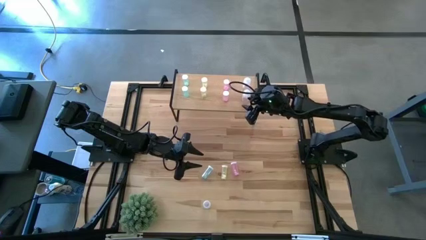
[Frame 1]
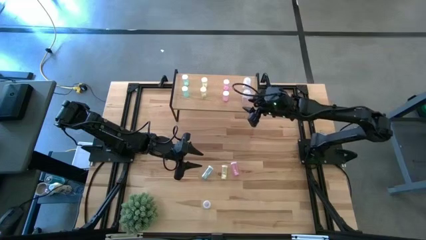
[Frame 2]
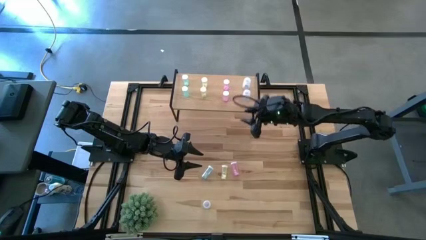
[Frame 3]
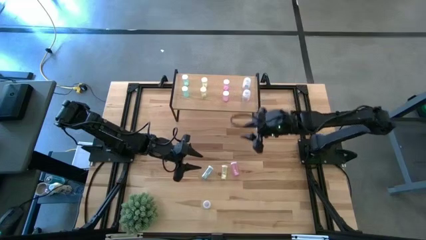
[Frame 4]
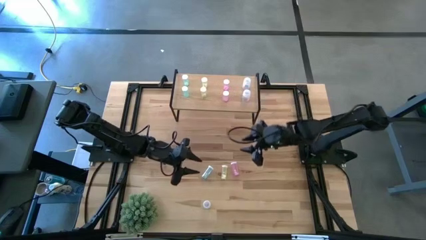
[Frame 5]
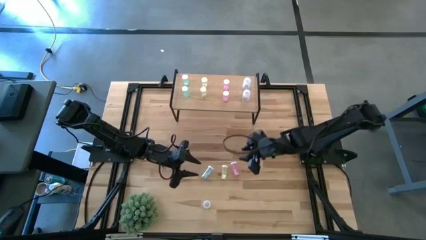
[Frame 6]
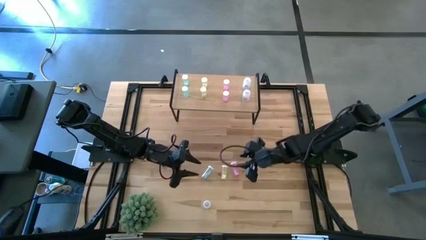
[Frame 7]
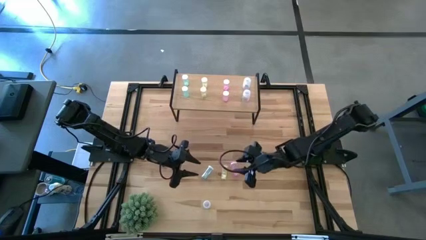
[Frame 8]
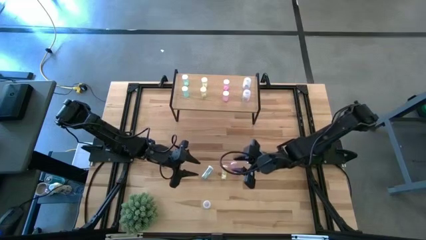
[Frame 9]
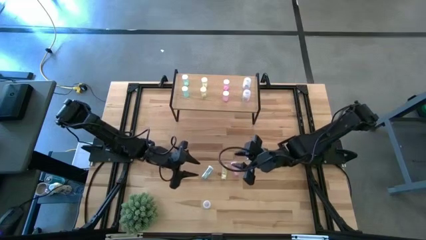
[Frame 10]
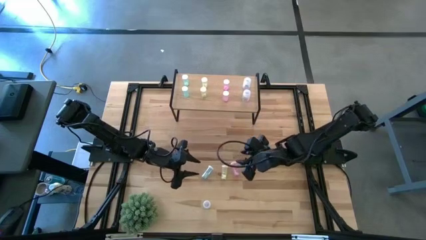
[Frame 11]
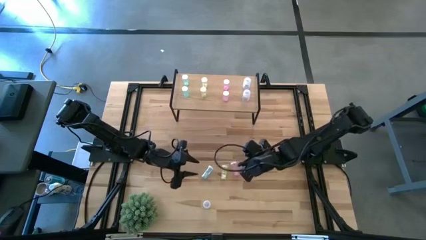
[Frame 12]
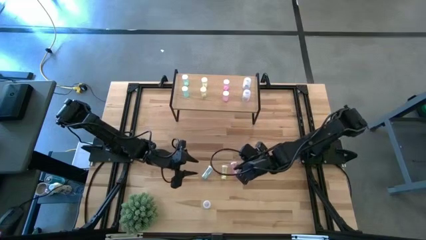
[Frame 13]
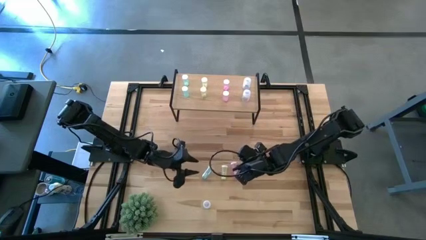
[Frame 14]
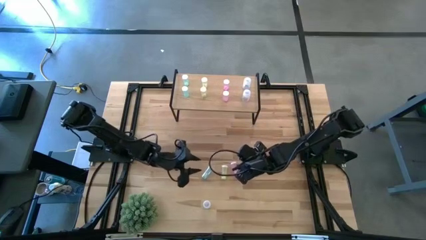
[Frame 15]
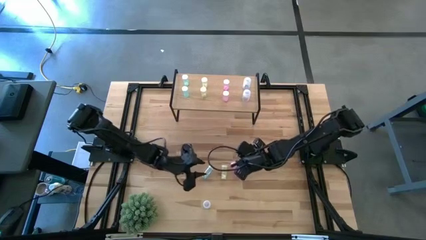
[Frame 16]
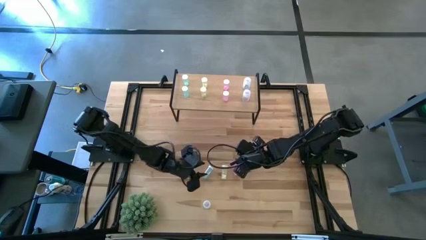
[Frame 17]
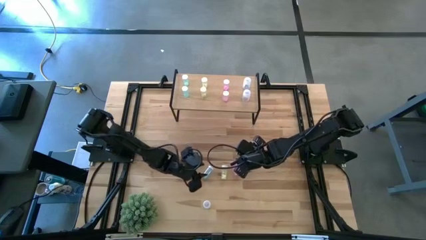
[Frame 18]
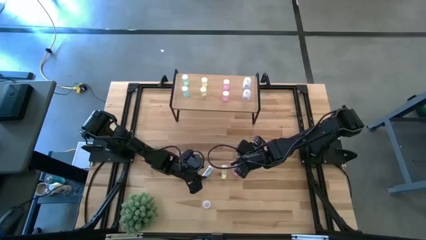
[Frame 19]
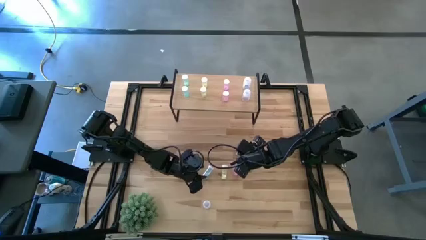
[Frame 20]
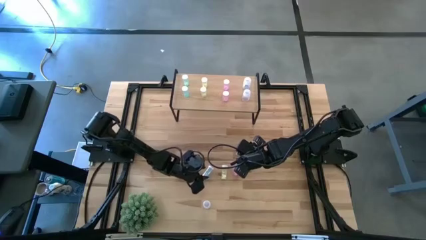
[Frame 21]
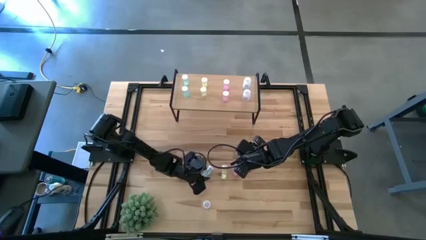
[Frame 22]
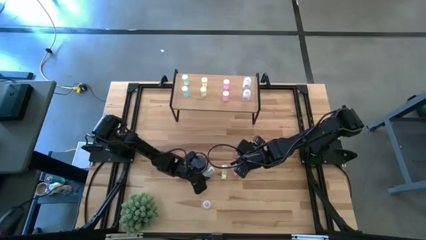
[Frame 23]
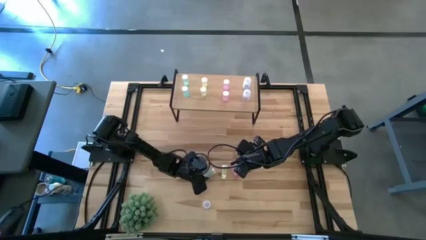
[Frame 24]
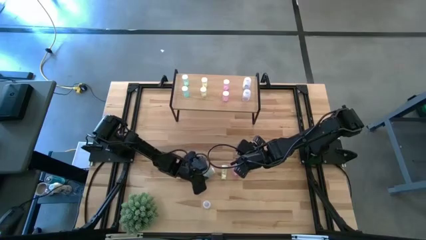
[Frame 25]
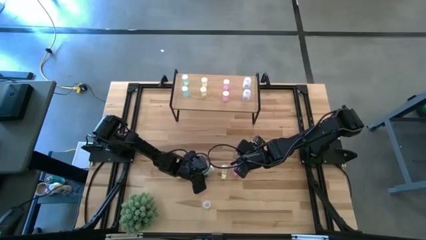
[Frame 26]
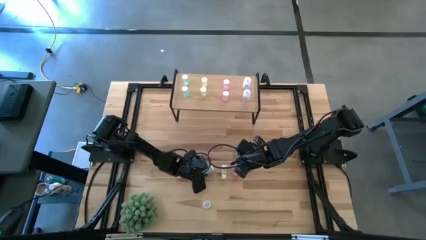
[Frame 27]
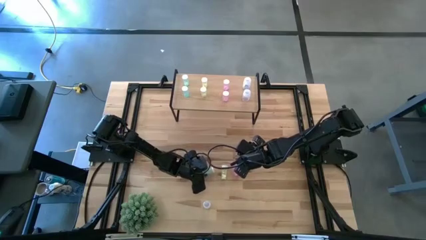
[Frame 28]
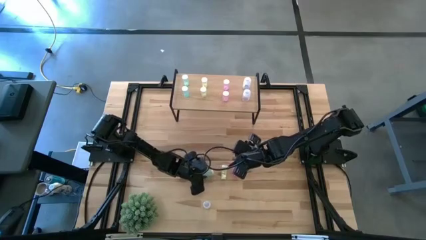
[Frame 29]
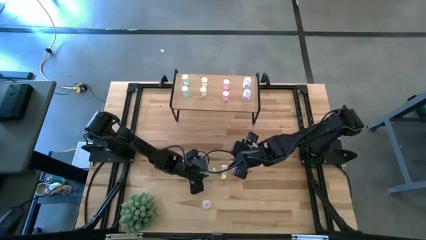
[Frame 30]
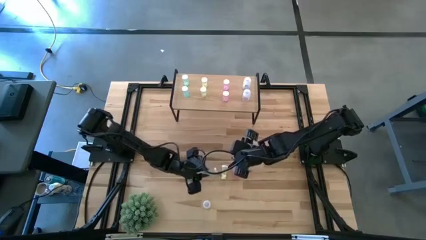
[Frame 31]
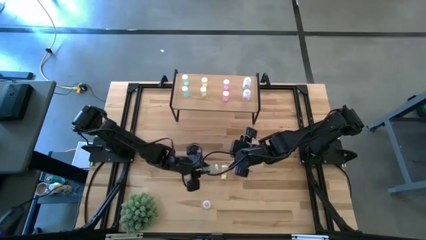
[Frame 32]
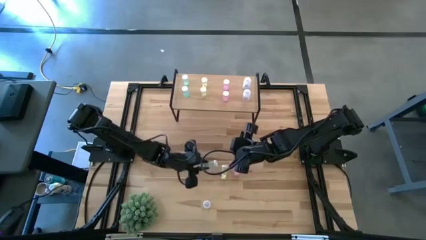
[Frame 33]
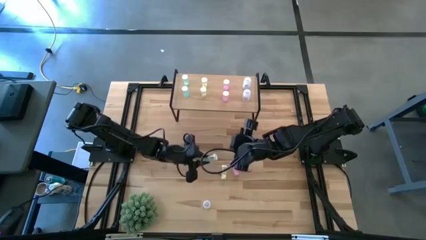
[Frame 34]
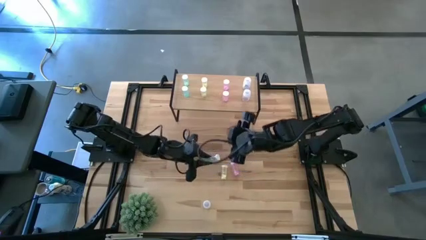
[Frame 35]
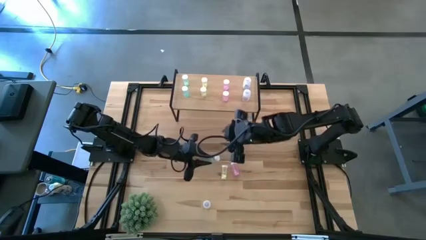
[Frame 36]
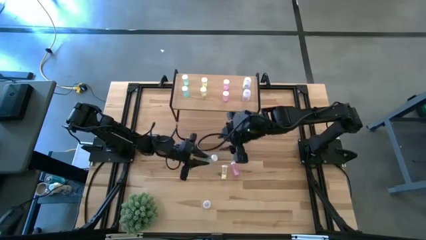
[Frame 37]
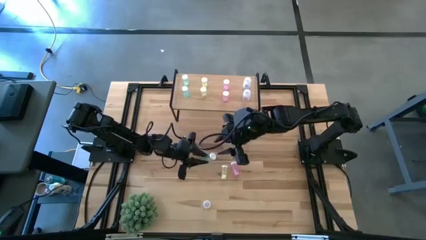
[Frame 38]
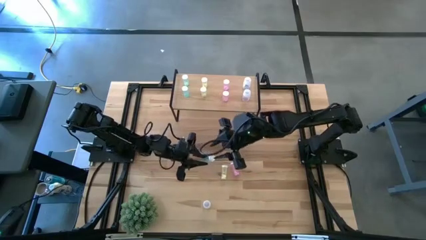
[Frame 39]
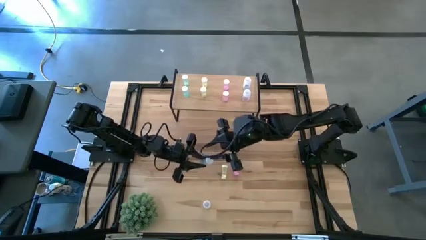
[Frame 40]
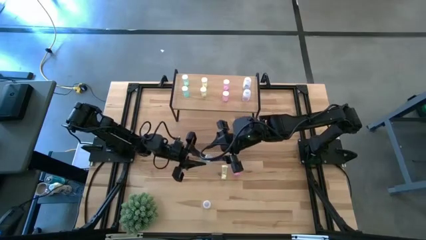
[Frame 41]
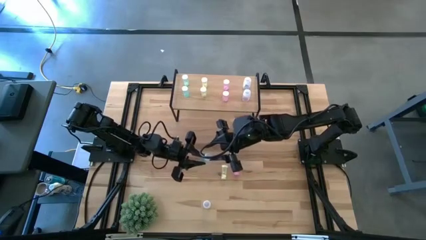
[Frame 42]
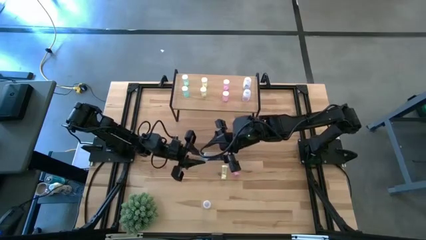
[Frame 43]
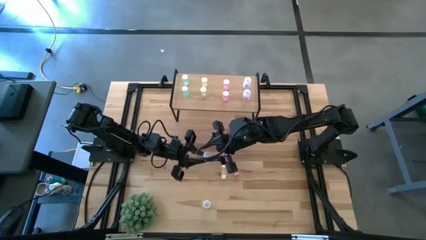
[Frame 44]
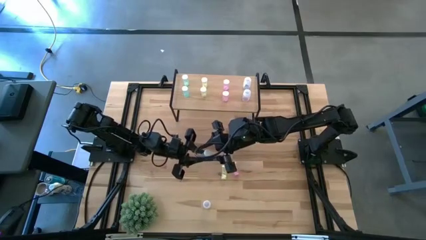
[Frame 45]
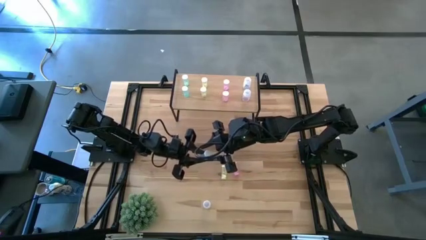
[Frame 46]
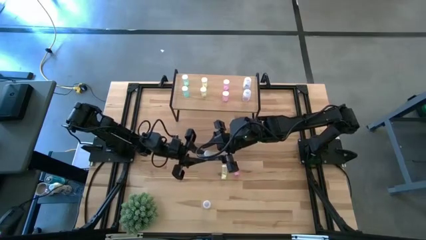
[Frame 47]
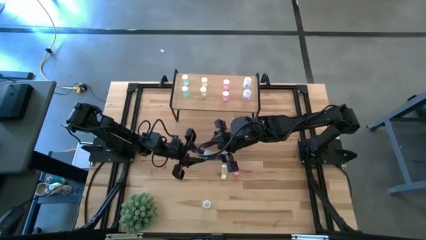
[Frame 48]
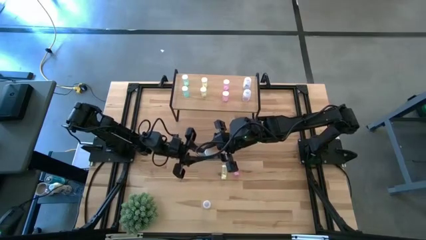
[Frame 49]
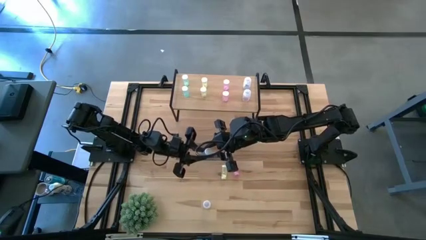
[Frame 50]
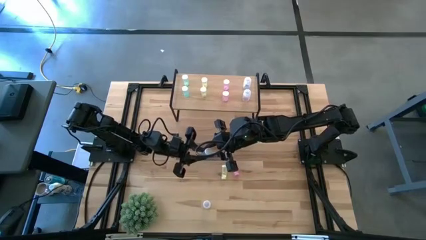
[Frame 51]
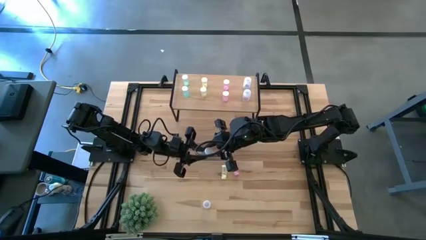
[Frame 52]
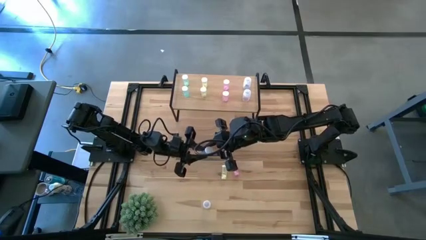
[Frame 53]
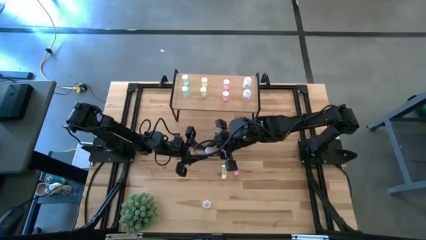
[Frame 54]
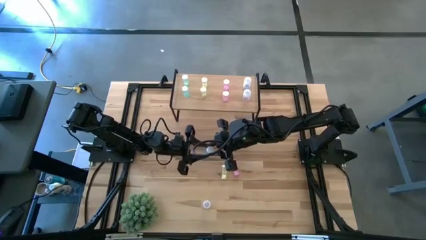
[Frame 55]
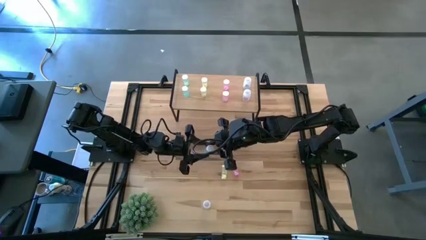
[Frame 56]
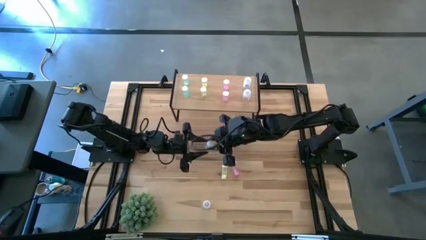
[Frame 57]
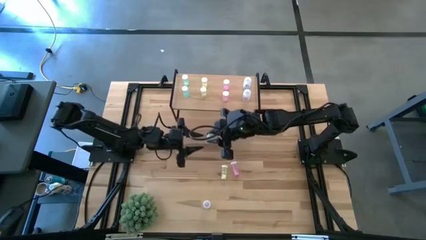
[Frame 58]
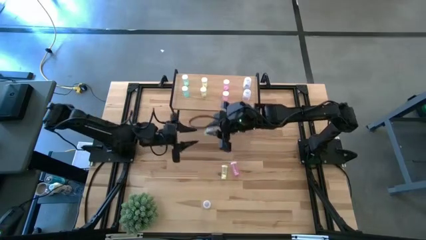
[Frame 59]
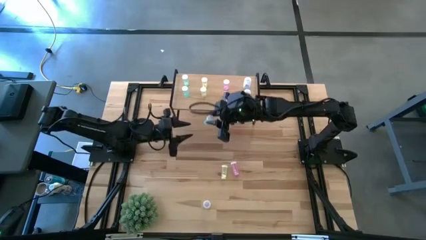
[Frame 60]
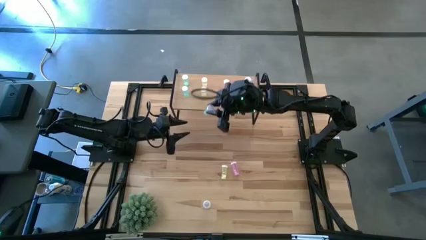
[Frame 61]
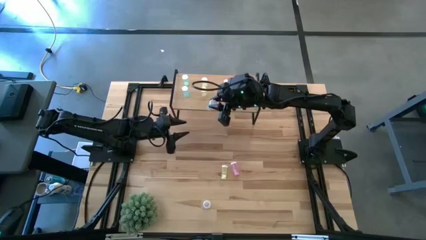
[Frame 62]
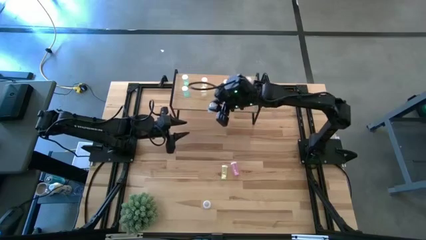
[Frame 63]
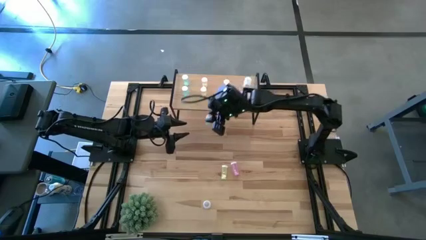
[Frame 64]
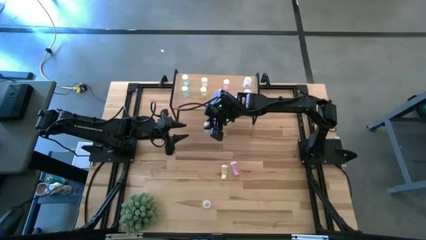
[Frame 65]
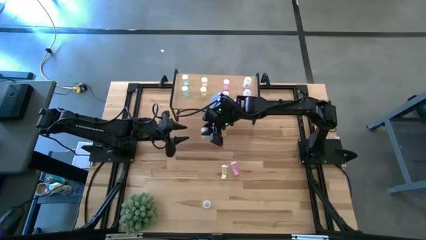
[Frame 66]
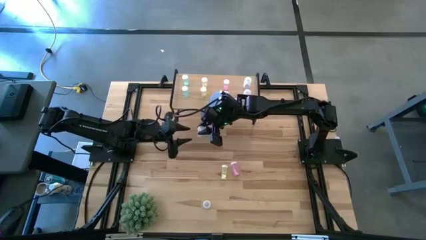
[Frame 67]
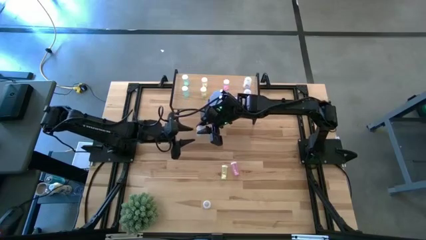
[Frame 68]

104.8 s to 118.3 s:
Task: Pick and place medicine bottles onto shelf by color
Put the blue pill bottle on the shelf aligned with the other blue pill bottles

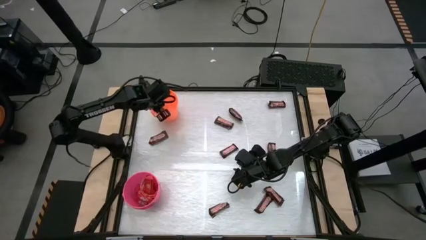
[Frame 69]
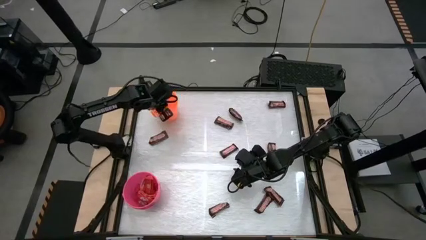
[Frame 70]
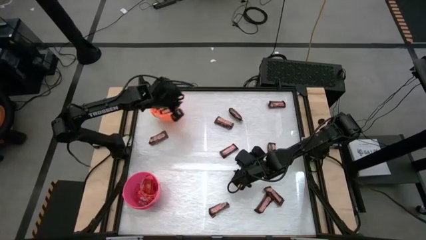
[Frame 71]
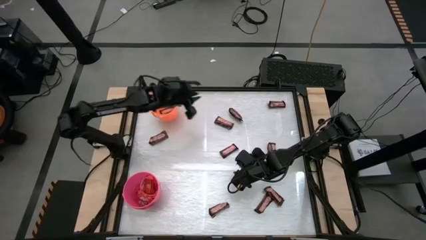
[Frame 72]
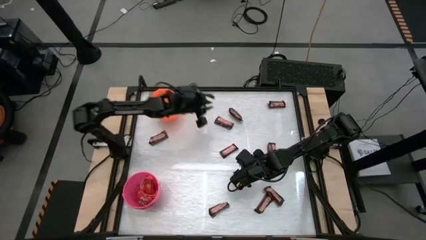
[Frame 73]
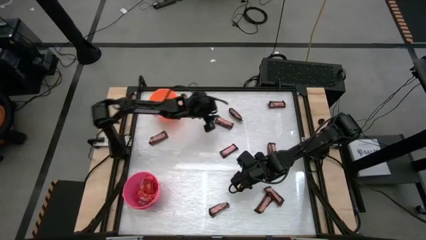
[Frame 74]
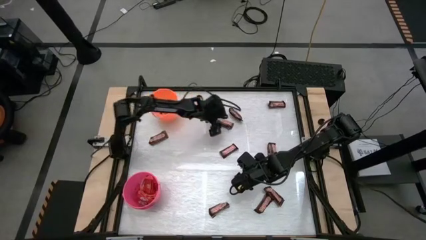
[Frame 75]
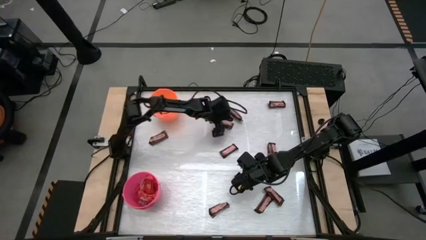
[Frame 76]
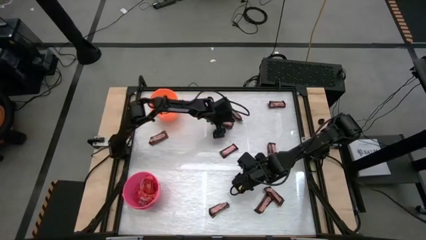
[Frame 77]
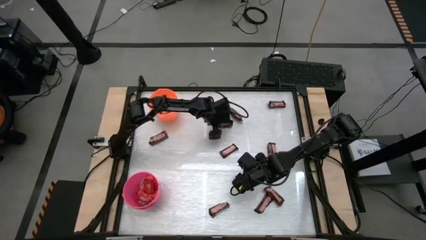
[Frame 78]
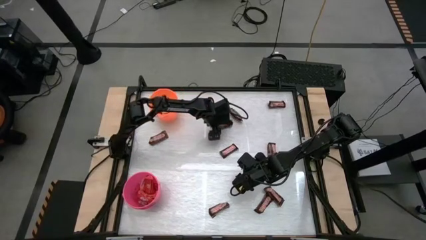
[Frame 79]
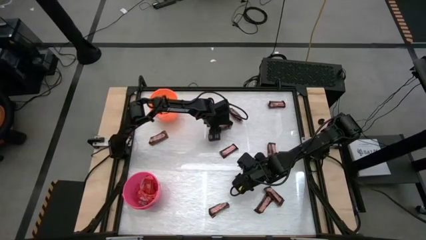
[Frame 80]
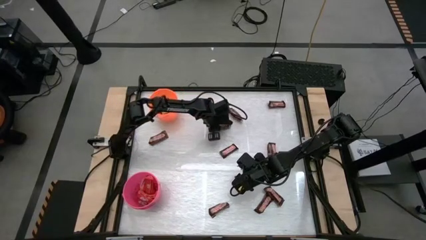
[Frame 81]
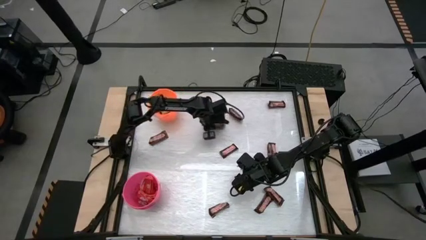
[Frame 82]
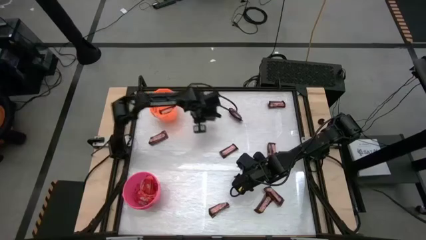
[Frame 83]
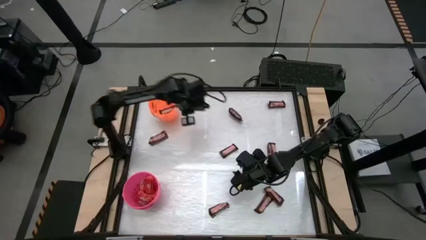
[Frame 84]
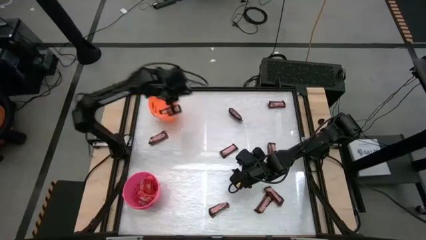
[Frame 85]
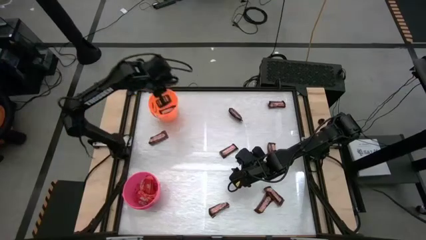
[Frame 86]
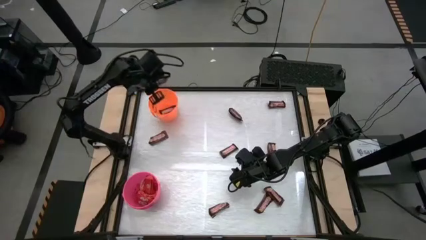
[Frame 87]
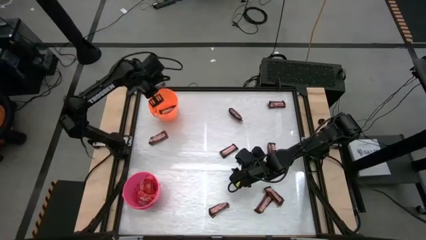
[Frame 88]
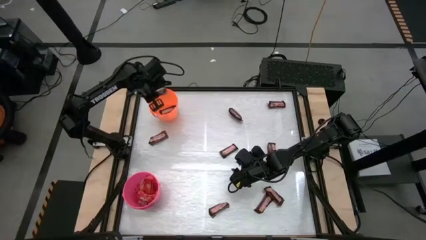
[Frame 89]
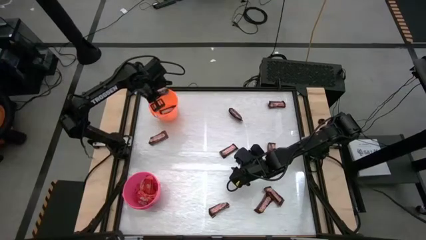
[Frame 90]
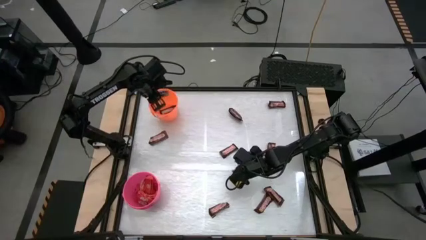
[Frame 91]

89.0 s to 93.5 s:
Task: Sort candy by brand, put in halloween buckets
Put the brown chocolate bar into the orange bucket
